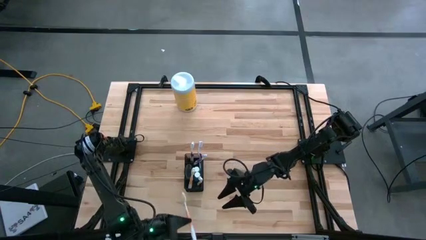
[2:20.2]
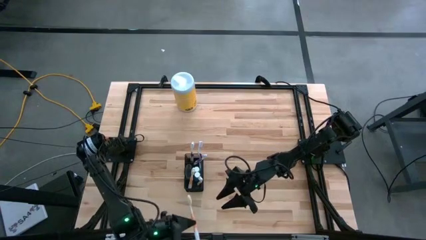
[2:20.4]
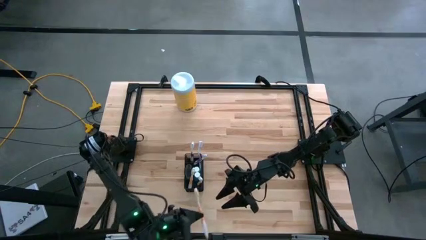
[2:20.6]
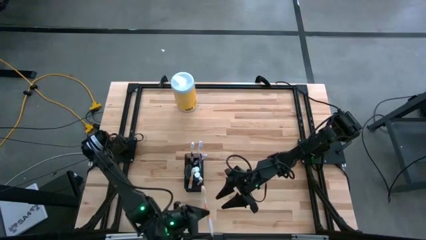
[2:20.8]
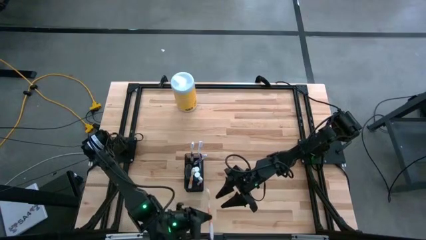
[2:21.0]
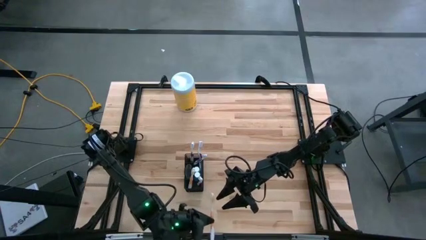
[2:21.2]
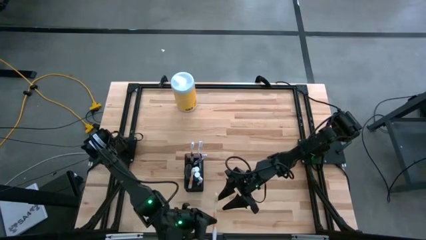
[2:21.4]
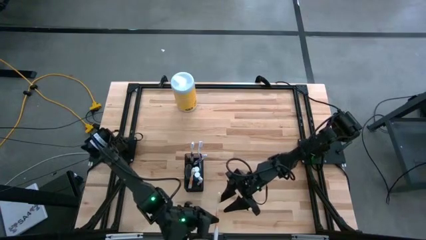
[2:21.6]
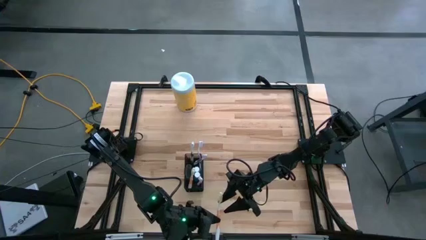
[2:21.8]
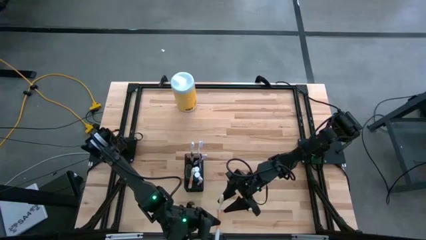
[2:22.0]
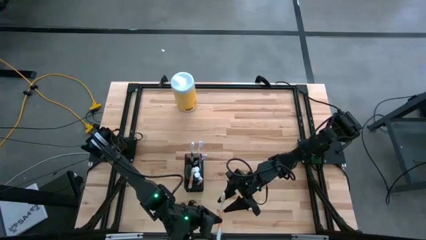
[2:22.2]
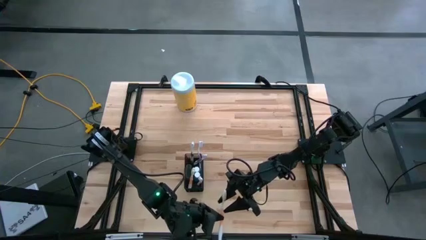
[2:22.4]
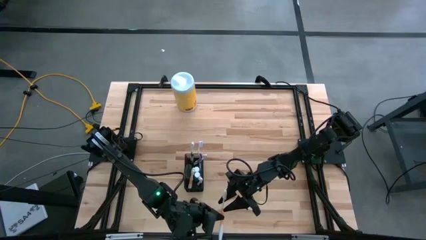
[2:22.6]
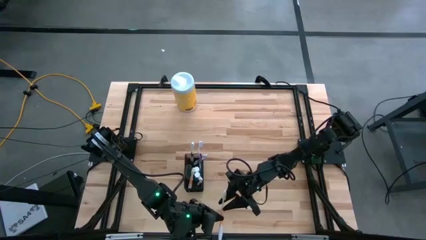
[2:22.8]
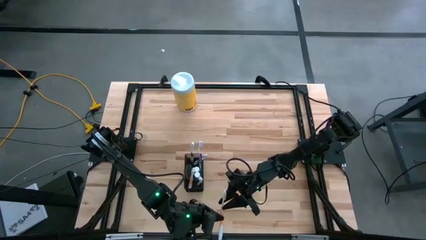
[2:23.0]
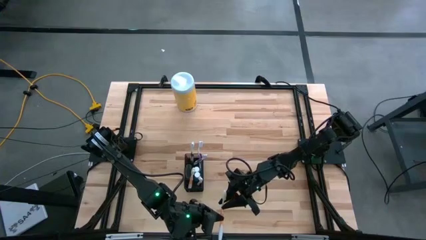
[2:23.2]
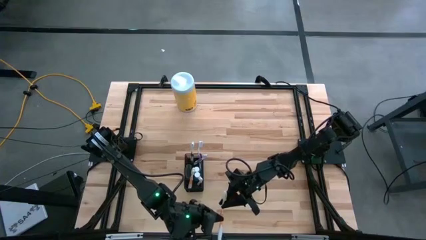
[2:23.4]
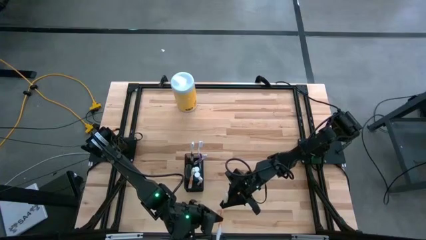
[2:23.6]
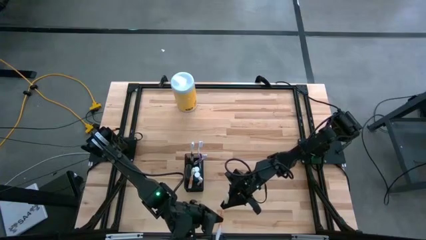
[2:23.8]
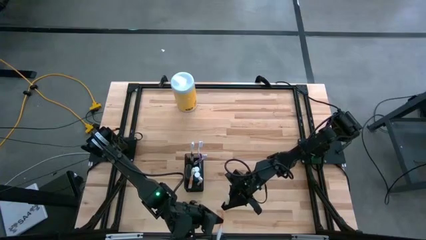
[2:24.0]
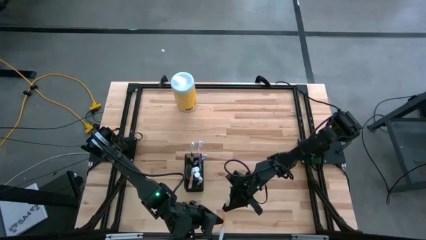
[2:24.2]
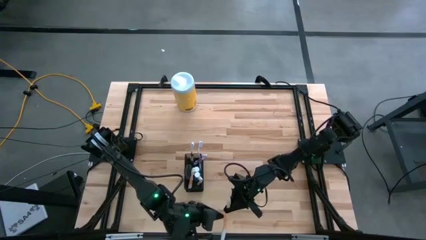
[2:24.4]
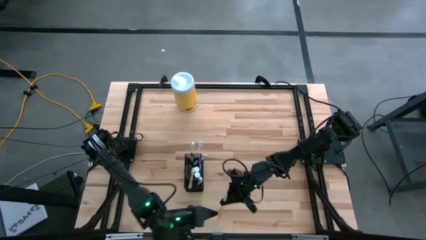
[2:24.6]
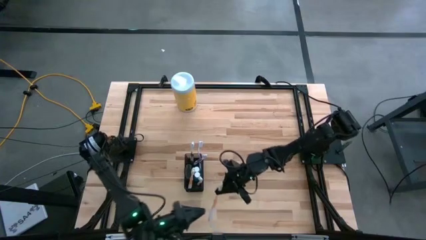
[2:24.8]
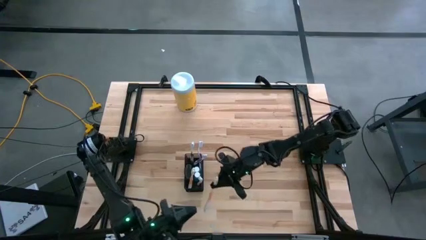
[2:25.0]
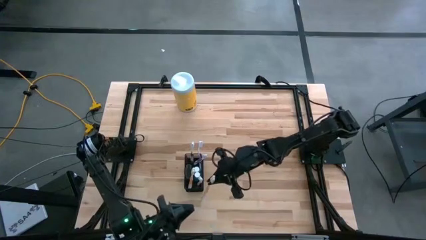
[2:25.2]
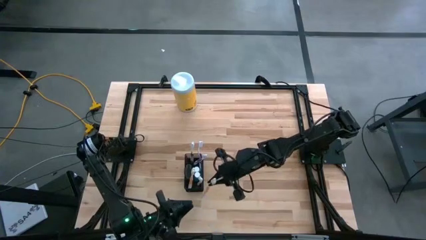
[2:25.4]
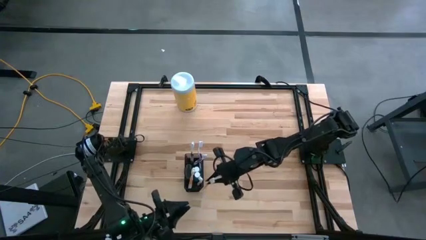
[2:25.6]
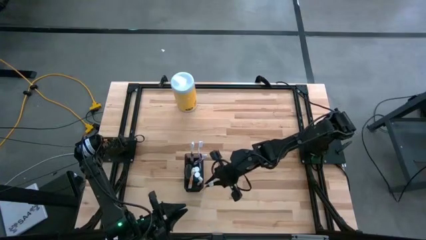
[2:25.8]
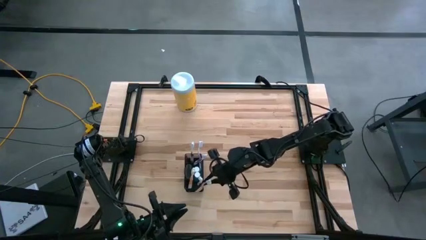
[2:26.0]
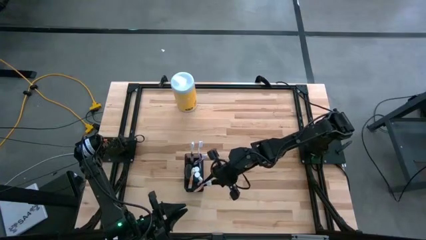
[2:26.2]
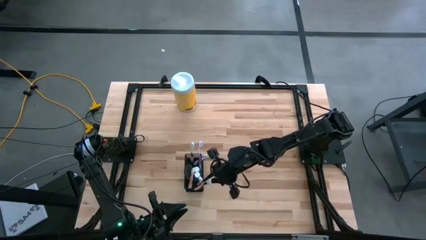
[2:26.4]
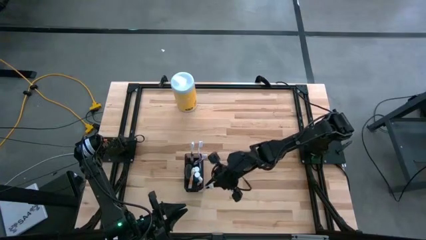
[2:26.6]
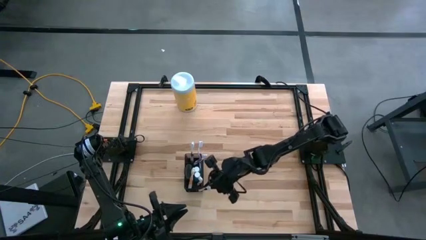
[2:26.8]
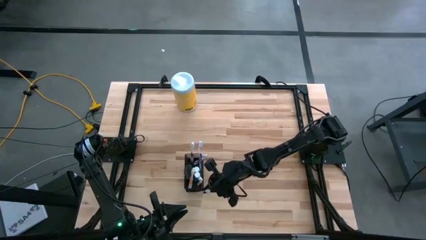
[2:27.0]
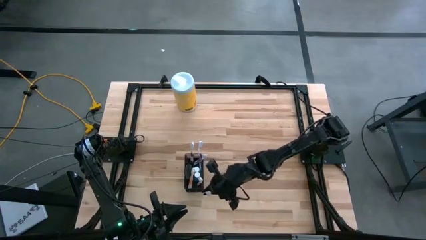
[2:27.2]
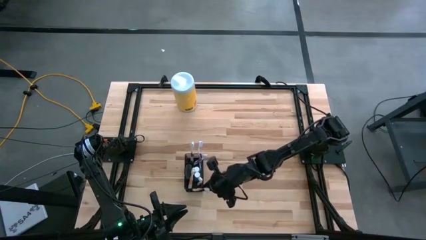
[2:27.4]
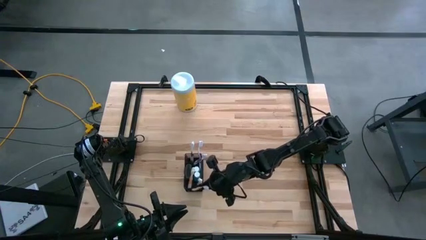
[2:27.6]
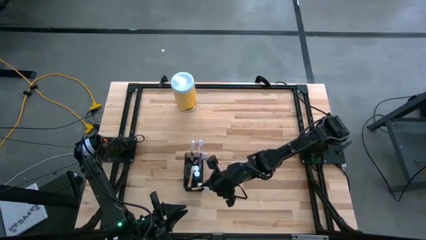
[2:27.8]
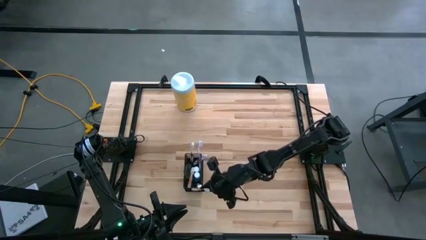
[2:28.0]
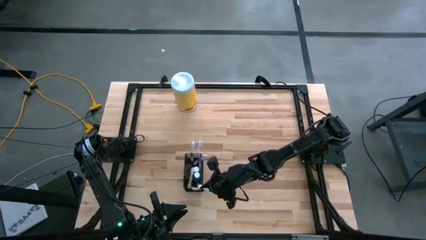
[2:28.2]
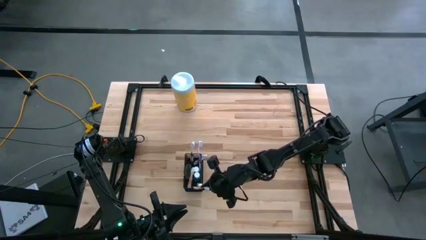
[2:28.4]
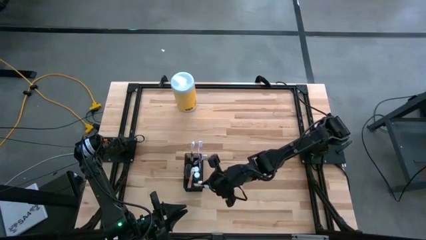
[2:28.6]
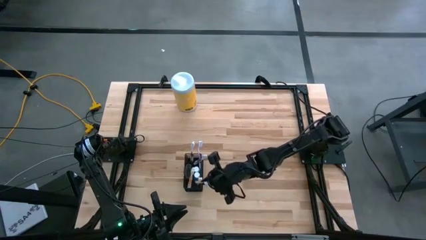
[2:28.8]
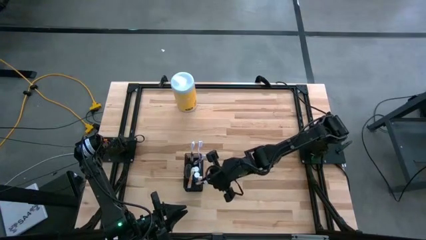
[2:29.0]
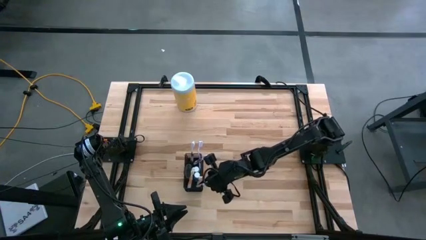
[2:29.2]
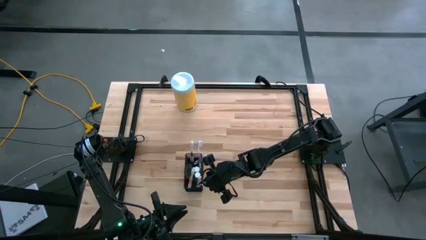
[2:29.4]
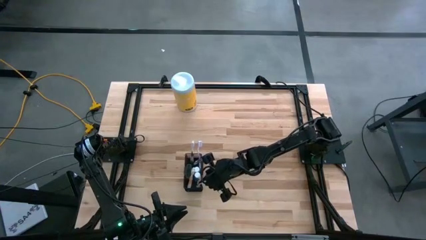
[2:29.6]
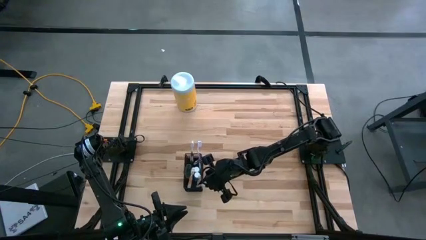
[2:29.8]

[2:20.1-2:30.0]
Task: Pick & Place toothbrushing station
Put the orange toothbrush into the bottom section of the black wire organizer
